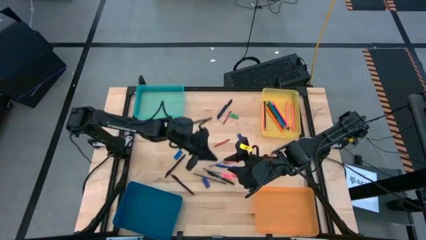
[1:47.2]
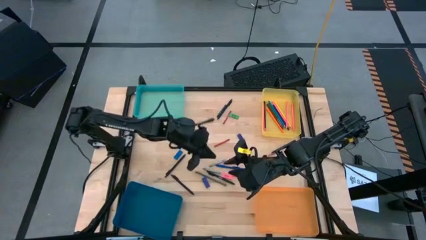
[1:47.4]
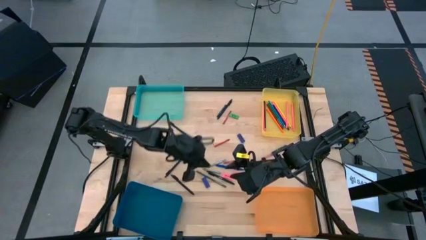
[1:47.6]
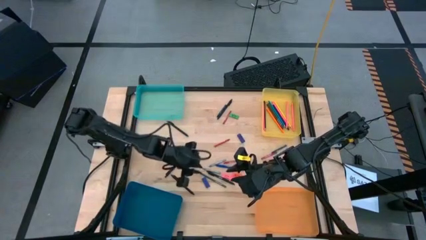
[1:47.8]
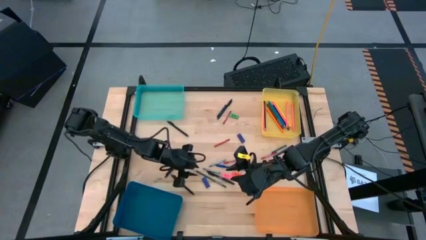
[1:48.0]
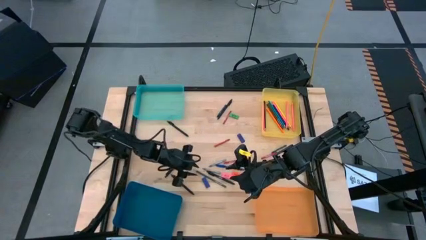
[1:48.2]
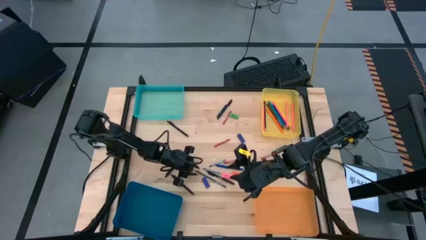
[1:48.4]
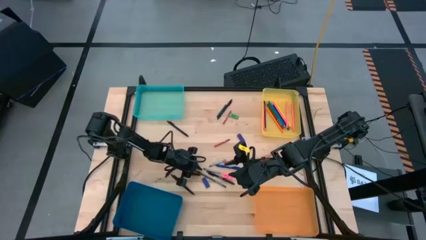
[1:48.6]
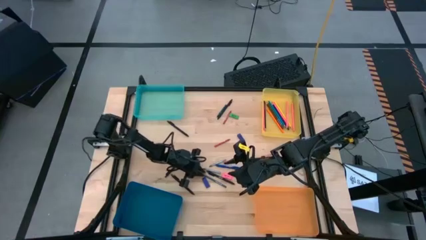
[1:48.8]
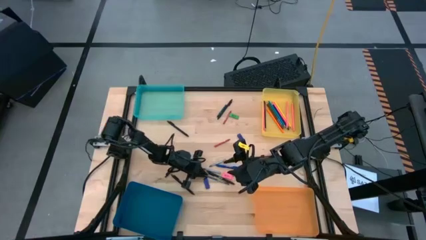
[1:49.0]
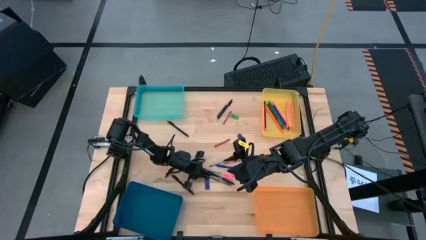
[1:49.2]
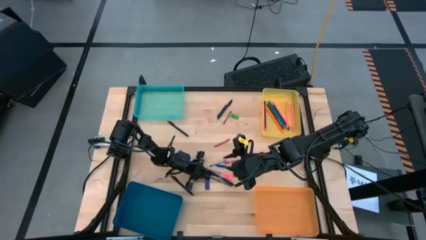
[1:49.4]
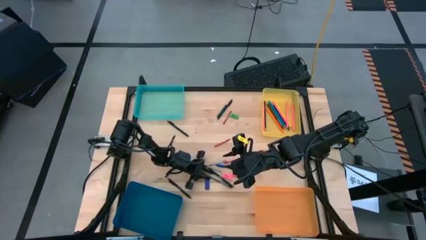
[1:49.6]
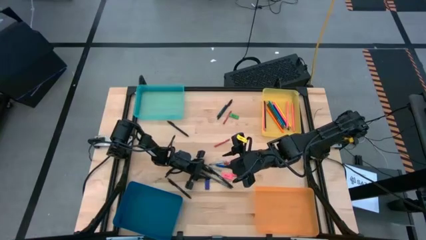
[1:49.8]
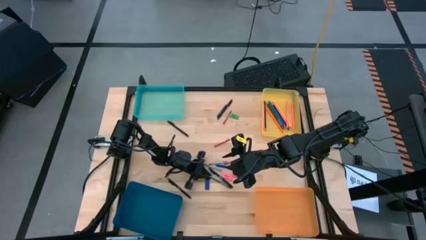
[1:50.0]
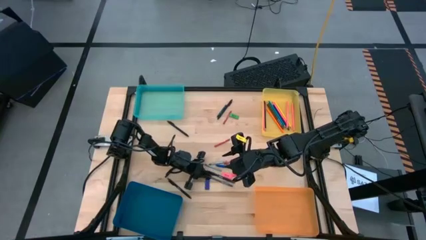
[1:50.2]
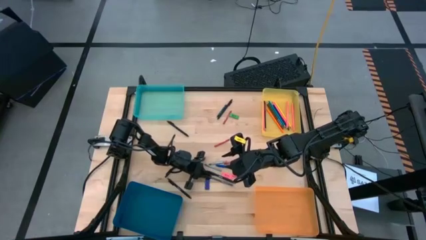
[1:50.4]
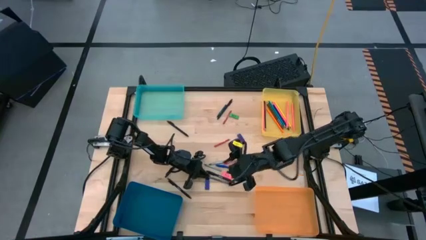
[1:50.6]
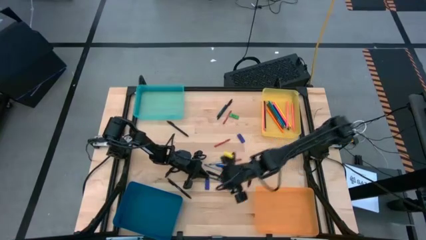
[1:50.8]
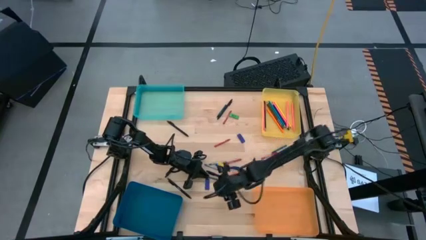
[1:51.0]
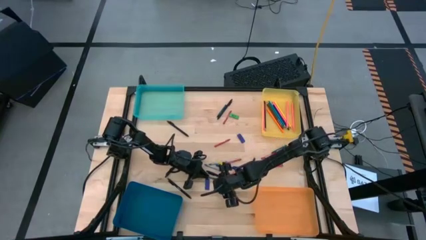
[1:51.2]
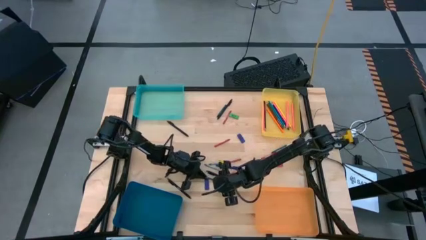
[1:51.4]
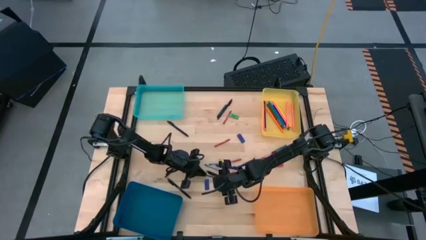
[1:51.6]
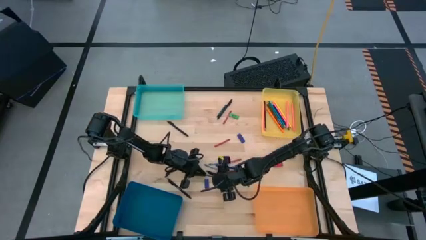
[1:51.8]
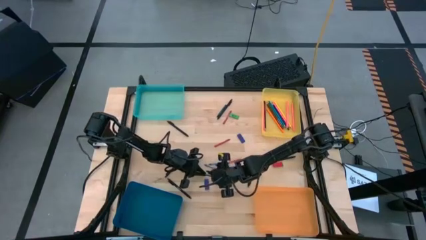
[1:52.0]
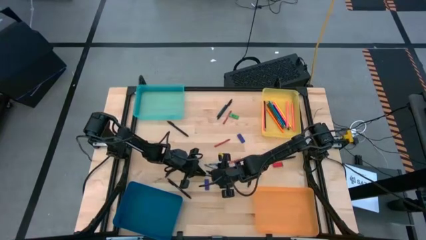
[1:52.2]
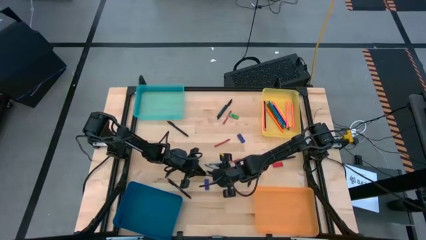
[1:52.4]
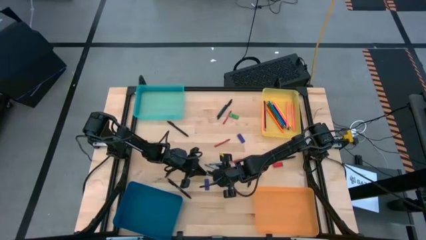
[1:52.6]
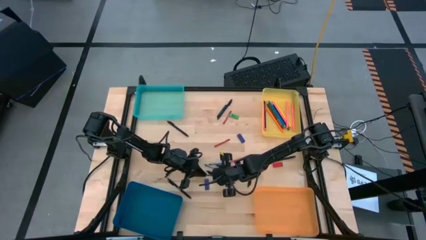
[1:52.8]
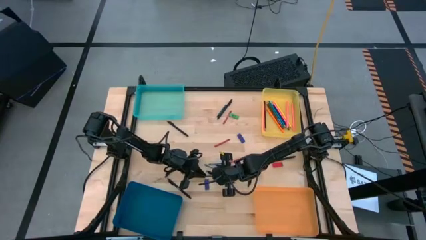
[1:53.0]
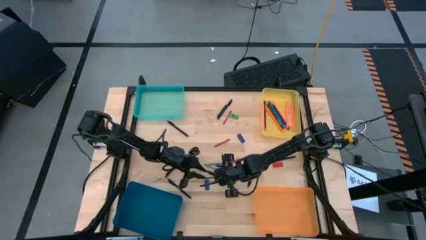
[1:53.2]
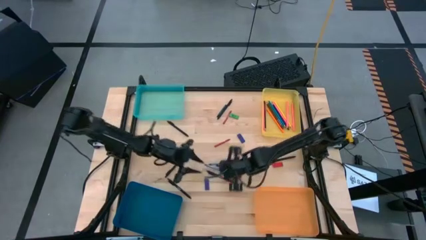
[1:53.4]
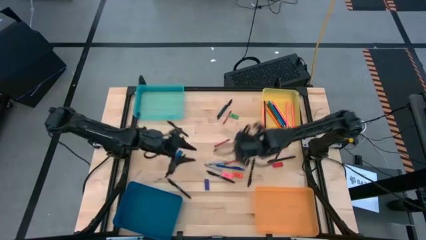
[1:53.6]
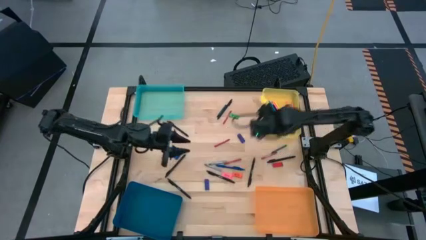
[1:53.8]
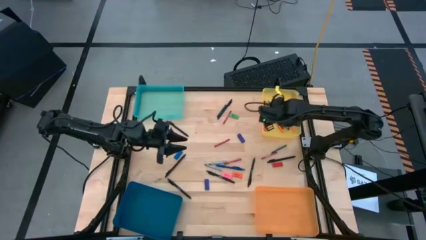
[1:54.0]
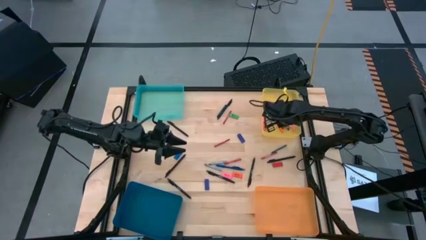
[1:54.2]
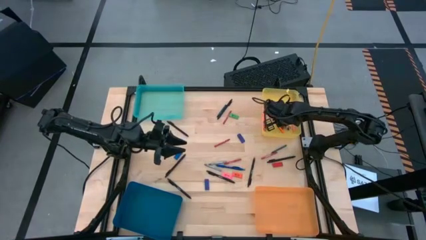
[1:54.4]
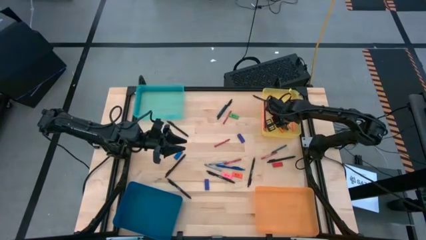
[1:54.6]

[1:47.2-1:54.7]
Task: Sort crayons/erasers/pens/pencils in bins
Put the green pencil into the yellow bin

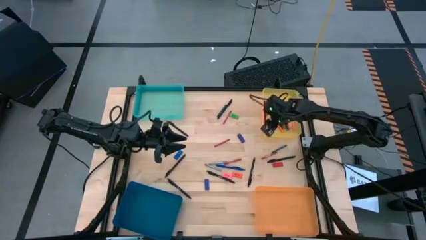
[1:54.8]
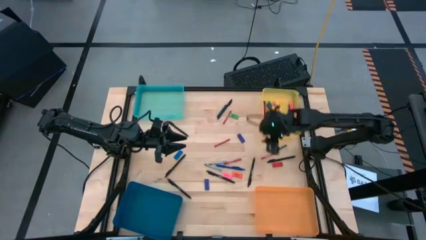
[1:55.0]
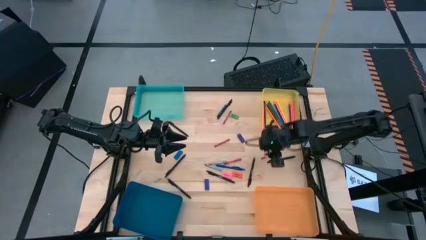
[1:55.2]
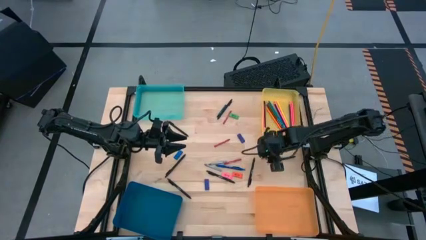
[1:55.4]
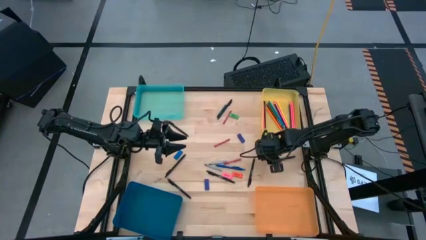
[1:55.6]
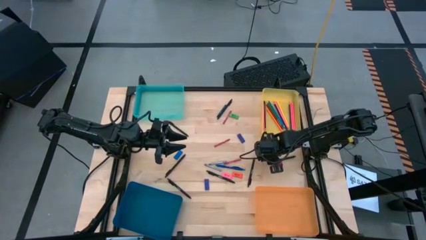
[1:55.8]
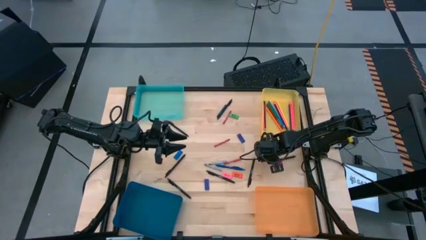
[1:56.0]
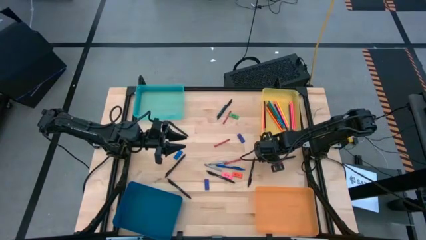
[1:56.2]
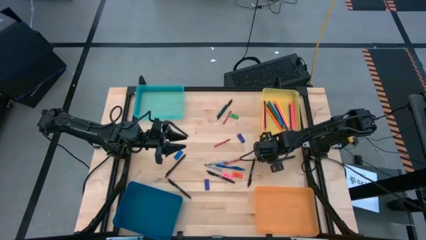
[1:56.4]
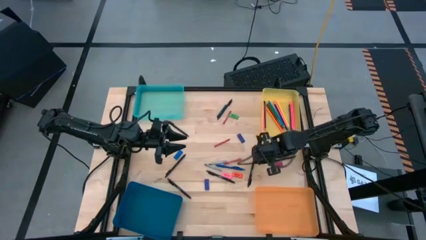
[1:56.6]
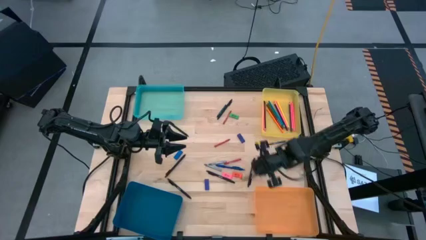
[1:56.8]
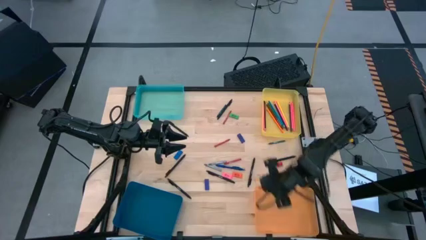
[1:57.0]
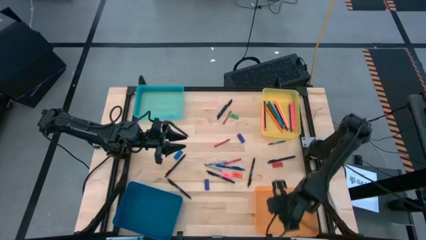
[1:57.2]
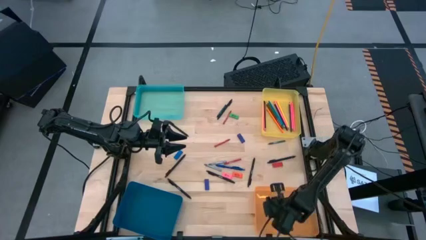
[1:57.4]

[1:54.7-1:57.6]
Put the red crayon into the orange bin

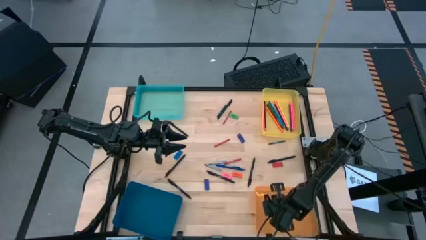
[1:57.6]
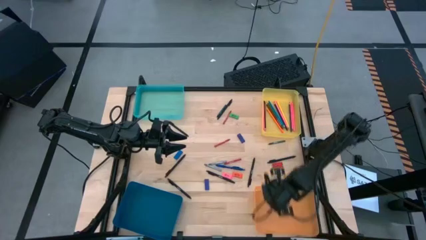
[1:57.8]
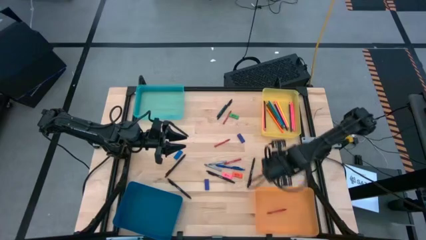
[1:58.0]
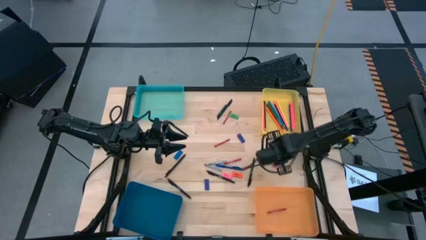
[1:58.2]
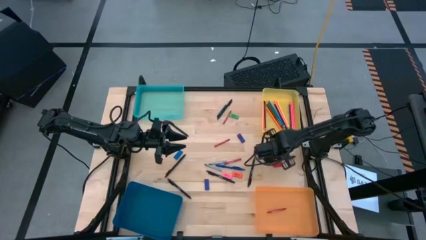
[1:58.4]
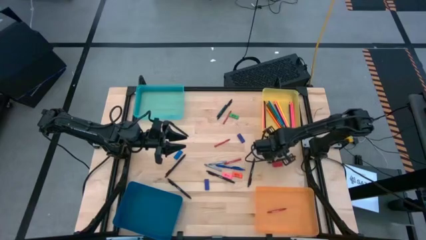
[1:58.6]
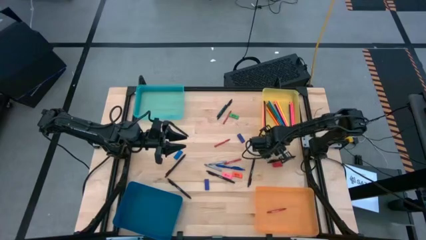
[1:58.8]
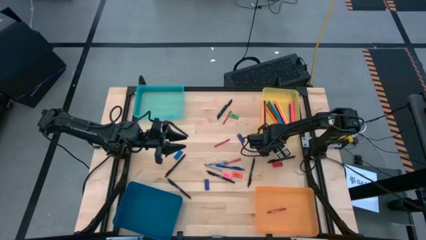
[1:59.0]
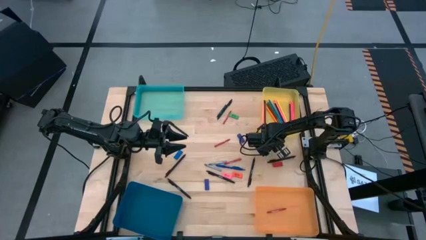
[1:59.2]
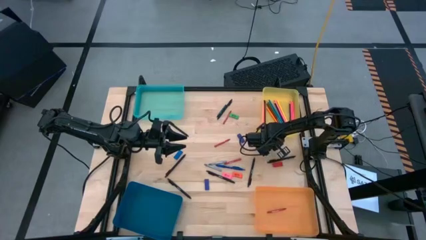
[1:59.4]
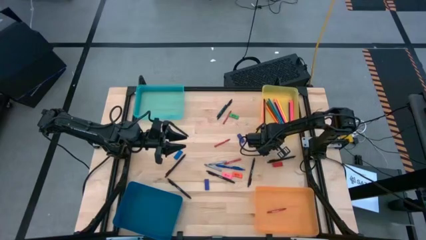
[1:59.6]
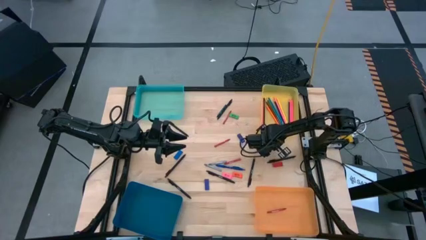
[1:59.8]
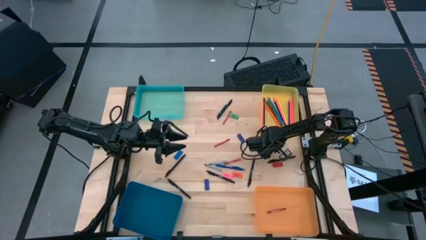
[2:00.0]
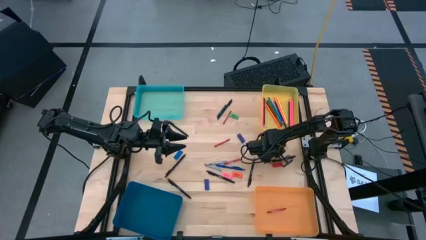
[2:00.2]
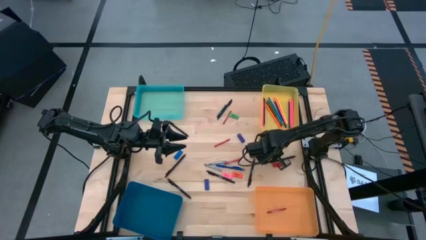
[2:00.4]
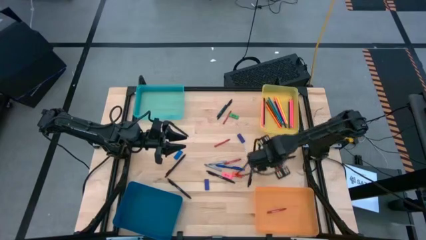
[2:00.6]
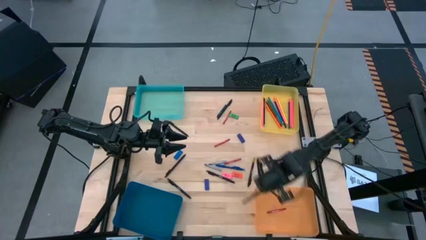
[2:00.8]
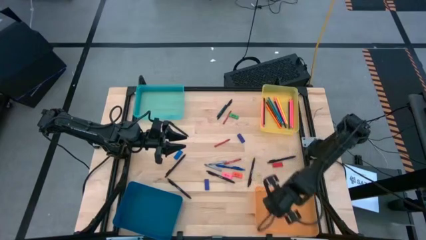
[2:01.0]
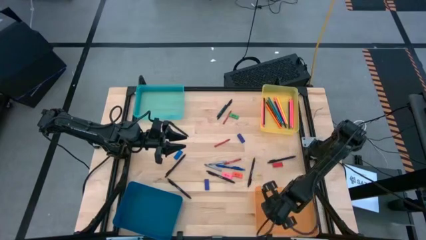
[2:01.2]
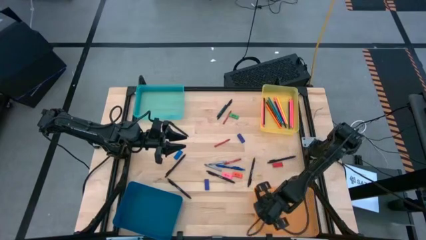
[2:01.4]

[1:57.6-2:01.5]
Put the green crayon into the orange bin

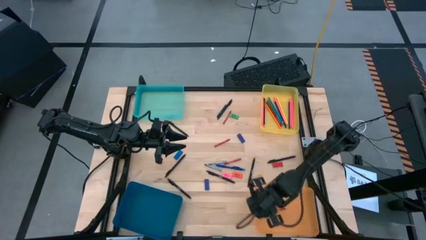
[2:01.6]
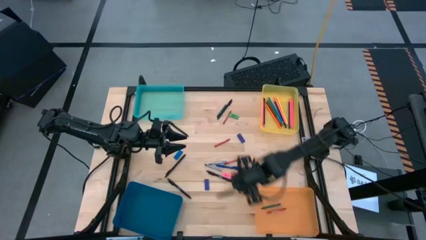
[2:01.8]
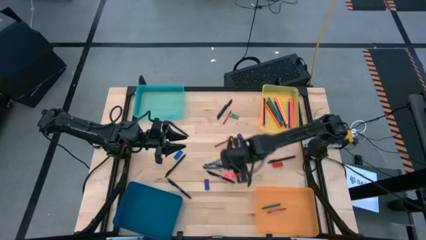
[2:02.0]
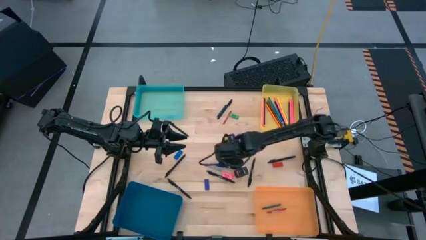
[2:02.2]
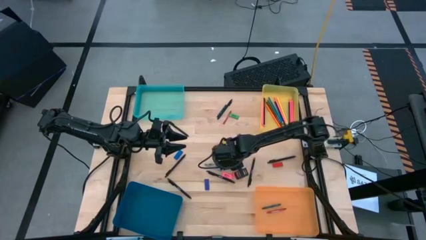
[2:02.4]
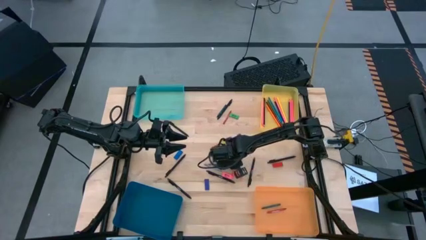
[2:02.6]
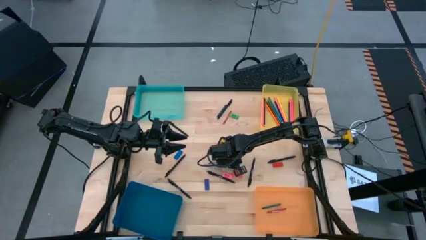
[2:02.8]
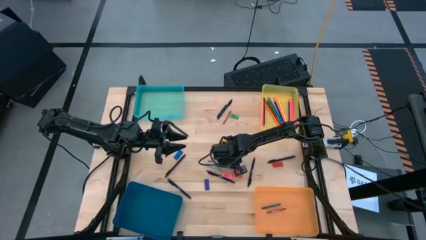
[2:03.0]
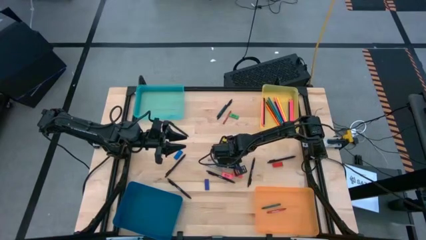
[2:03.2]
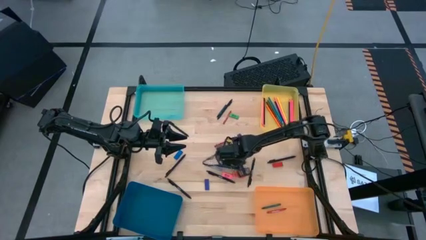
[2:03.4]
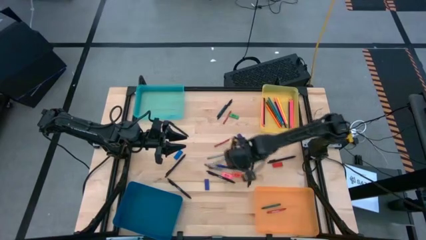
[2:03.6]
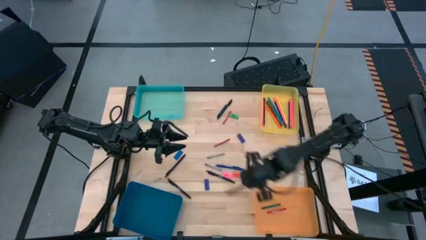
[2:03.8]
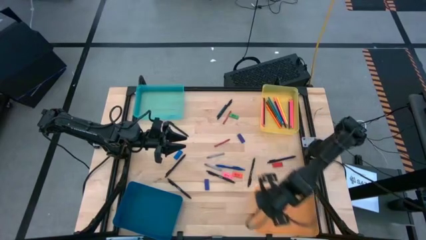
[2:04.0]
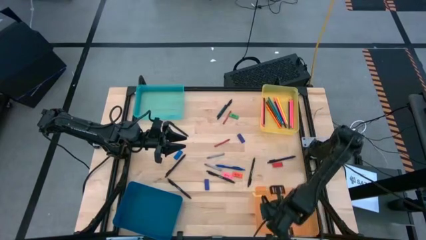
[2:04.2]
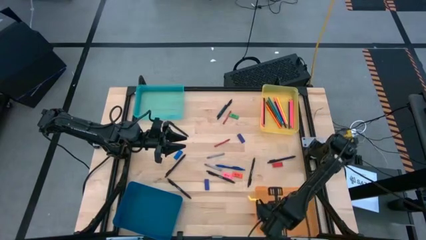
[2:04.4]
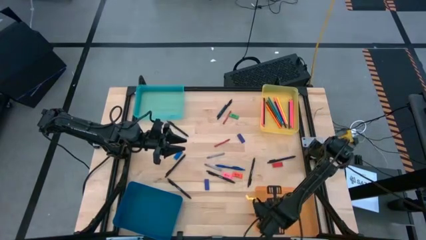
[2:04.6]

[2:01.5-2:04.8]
Put the red crayon into the orange bin
